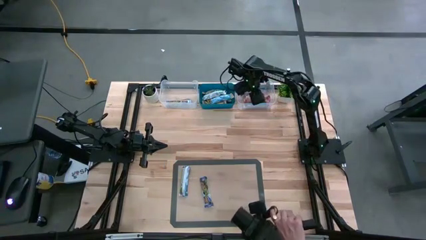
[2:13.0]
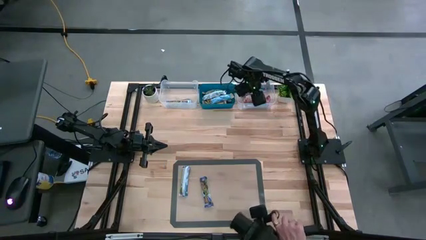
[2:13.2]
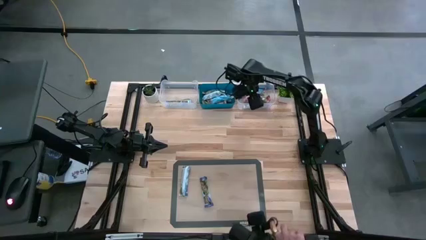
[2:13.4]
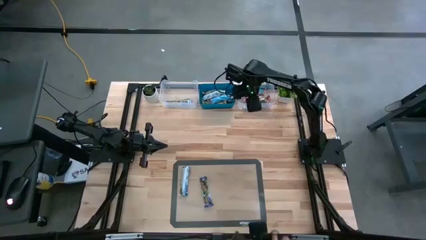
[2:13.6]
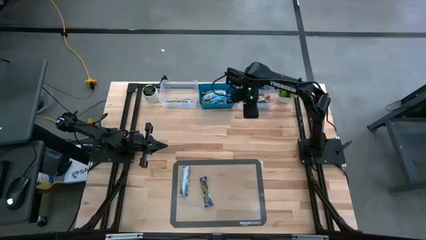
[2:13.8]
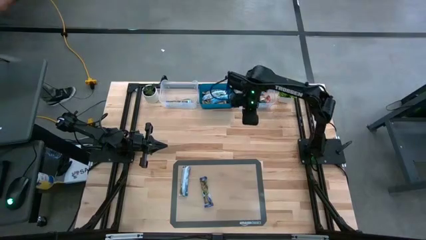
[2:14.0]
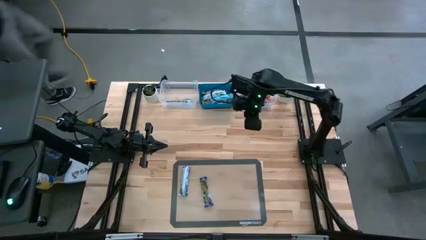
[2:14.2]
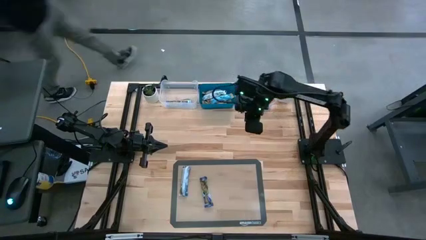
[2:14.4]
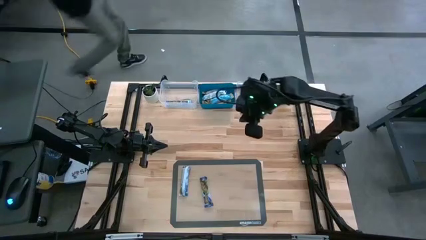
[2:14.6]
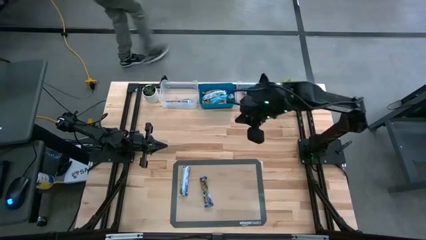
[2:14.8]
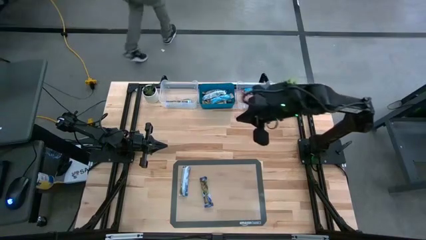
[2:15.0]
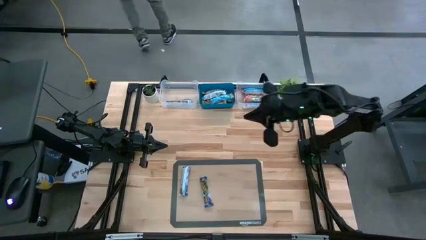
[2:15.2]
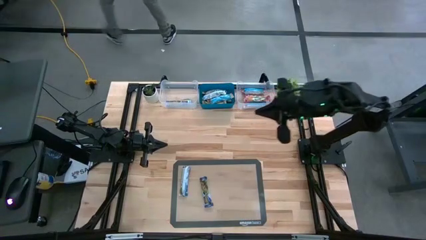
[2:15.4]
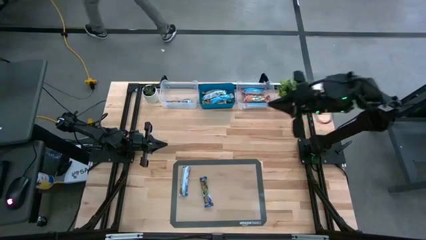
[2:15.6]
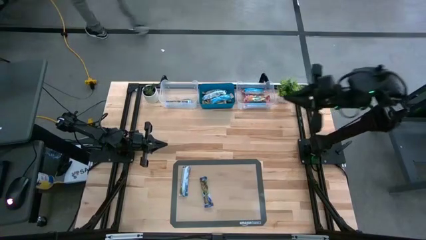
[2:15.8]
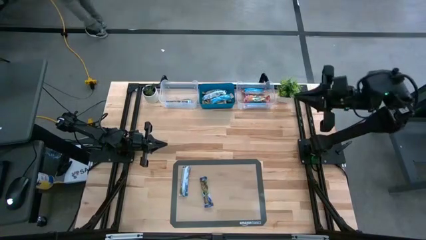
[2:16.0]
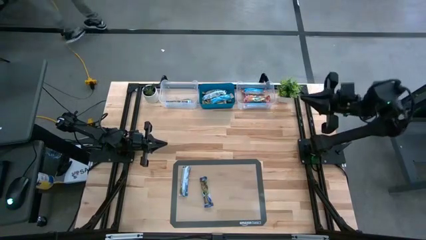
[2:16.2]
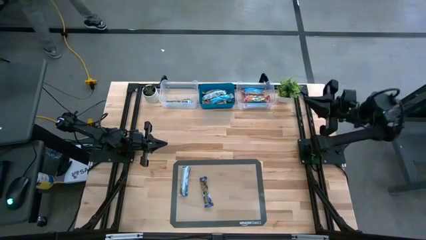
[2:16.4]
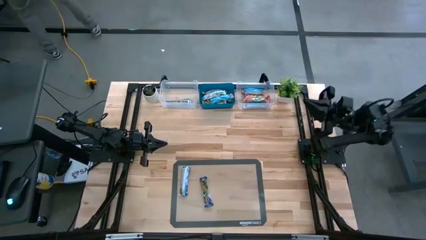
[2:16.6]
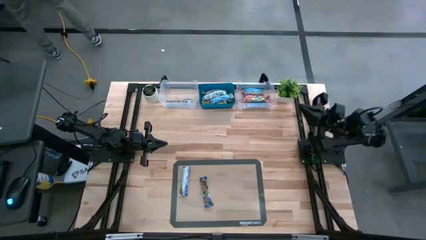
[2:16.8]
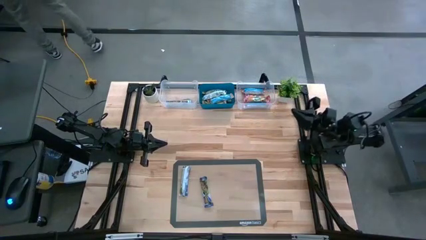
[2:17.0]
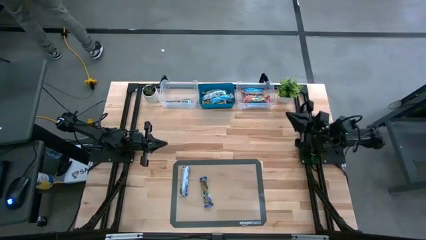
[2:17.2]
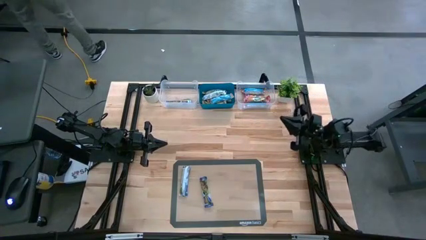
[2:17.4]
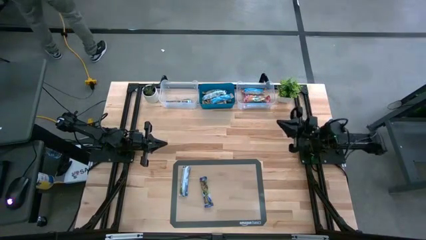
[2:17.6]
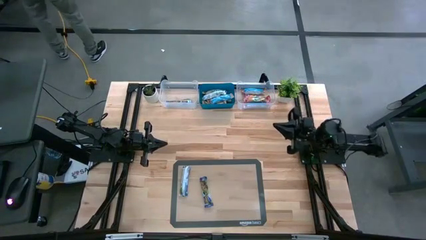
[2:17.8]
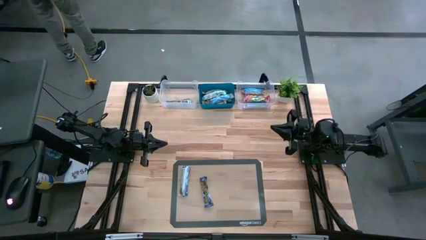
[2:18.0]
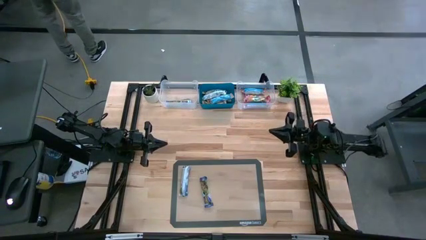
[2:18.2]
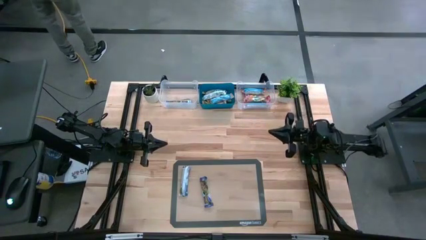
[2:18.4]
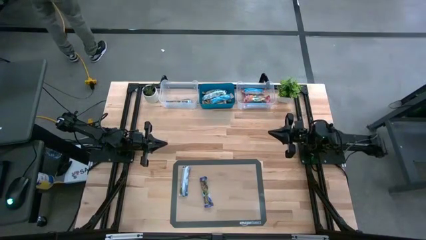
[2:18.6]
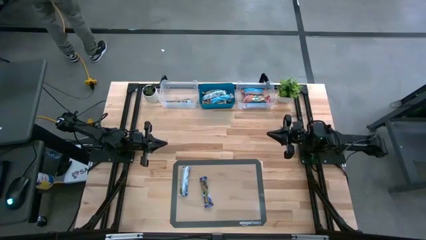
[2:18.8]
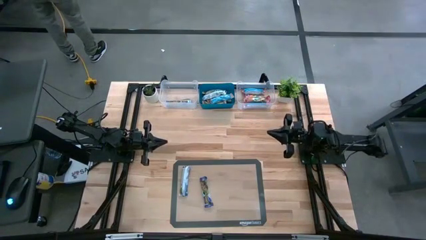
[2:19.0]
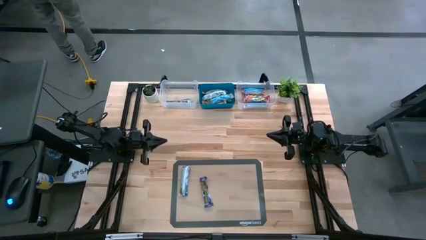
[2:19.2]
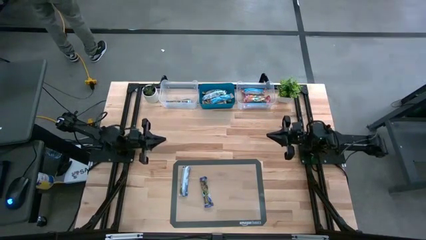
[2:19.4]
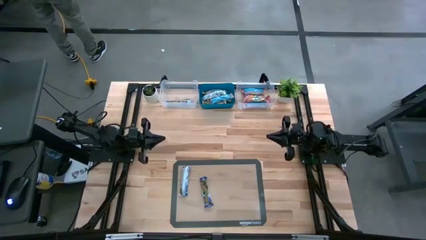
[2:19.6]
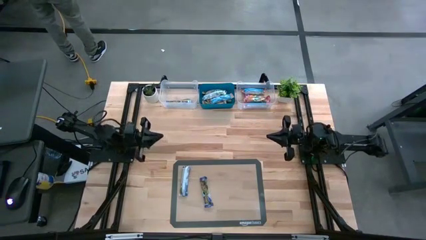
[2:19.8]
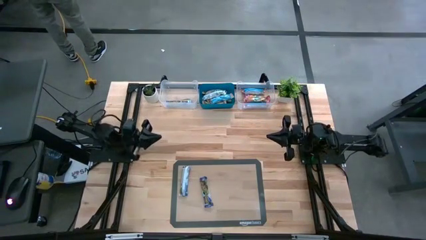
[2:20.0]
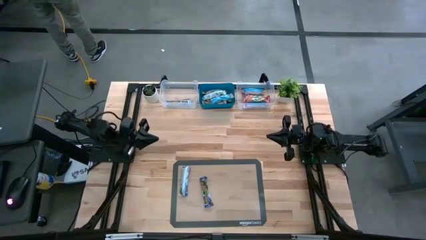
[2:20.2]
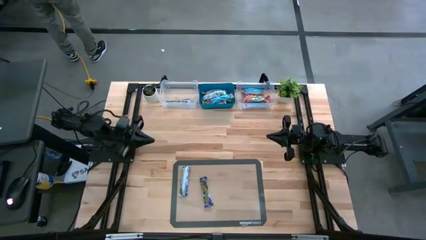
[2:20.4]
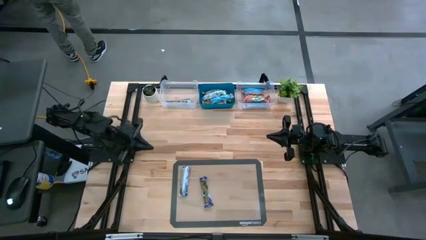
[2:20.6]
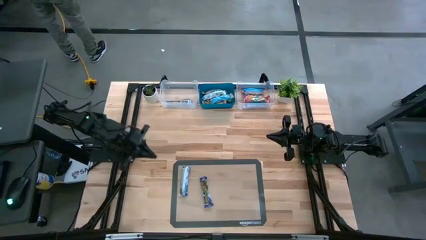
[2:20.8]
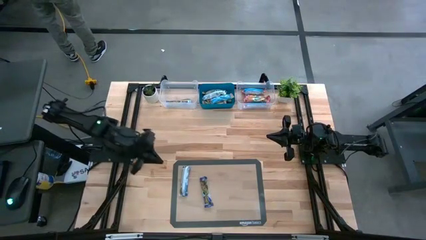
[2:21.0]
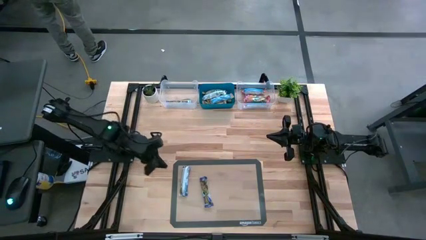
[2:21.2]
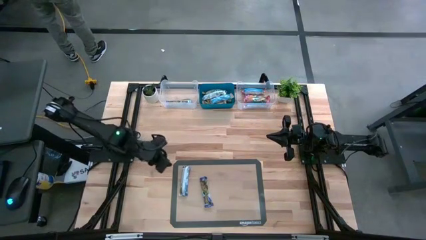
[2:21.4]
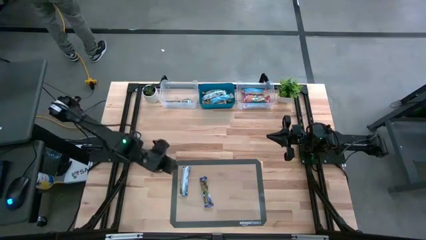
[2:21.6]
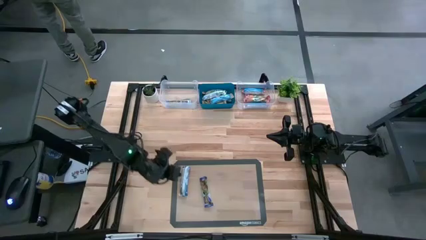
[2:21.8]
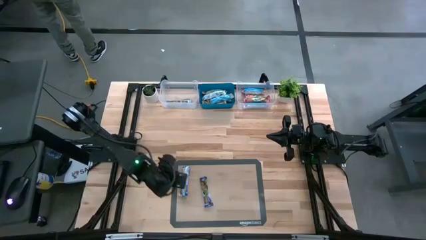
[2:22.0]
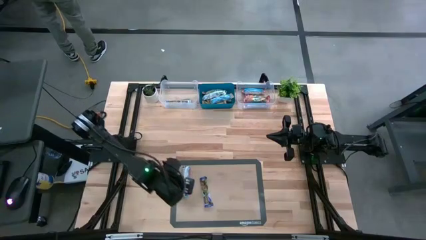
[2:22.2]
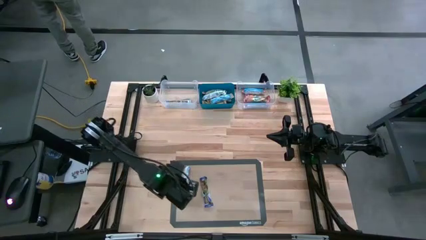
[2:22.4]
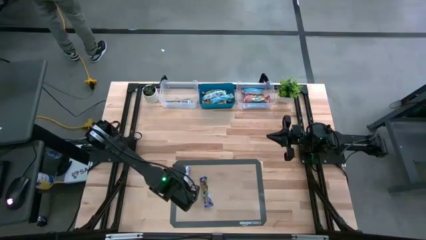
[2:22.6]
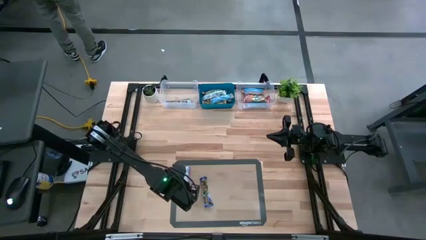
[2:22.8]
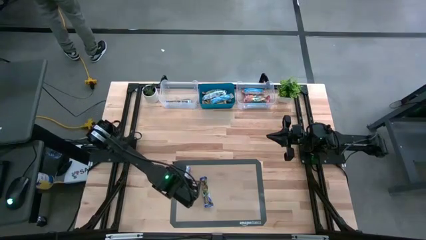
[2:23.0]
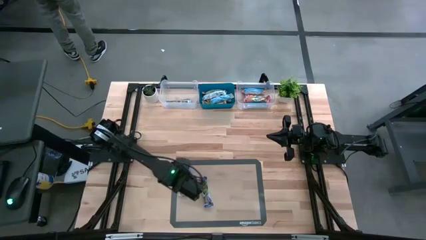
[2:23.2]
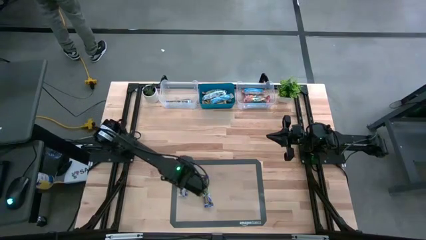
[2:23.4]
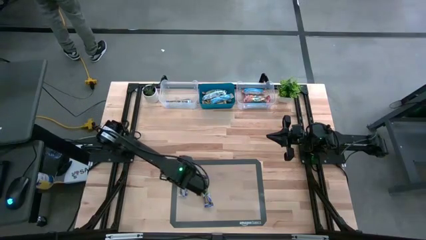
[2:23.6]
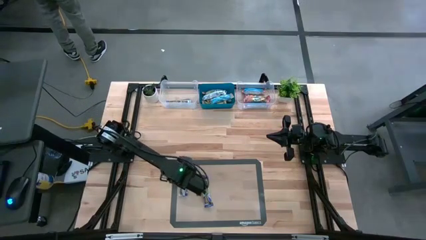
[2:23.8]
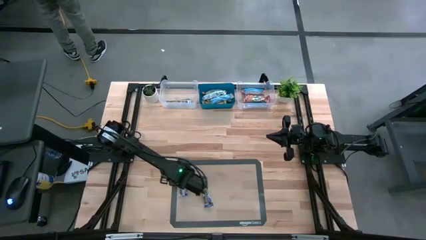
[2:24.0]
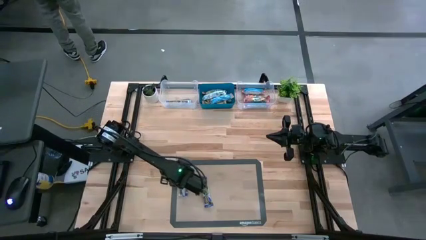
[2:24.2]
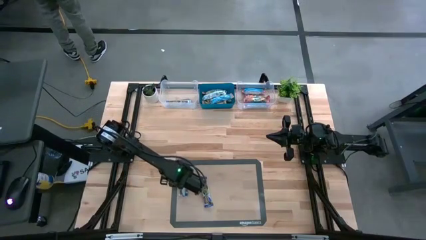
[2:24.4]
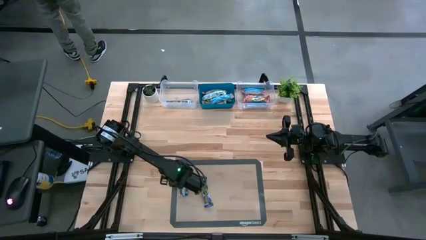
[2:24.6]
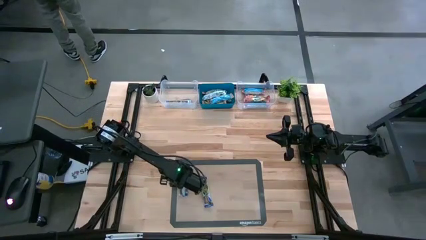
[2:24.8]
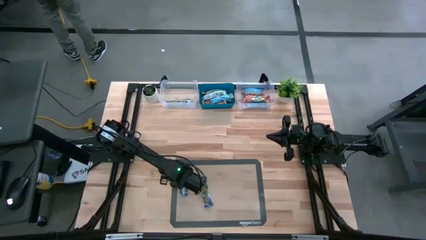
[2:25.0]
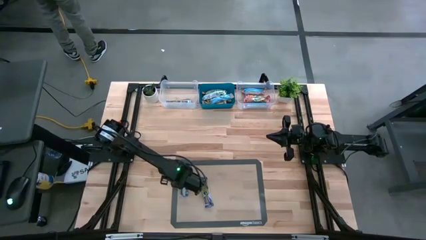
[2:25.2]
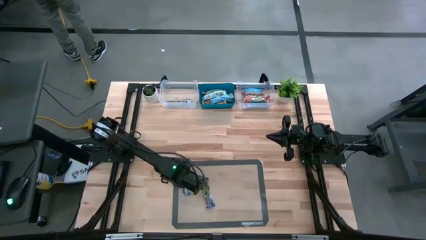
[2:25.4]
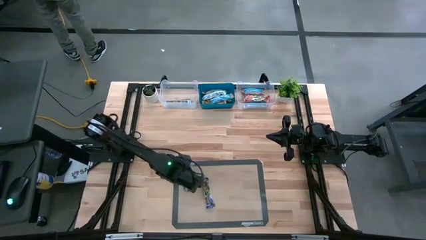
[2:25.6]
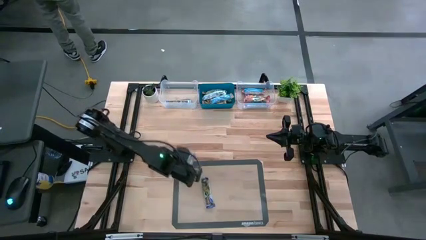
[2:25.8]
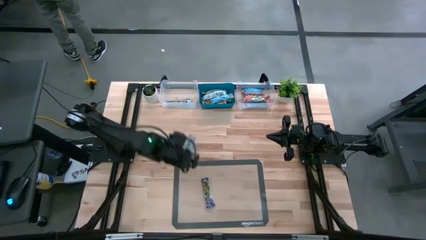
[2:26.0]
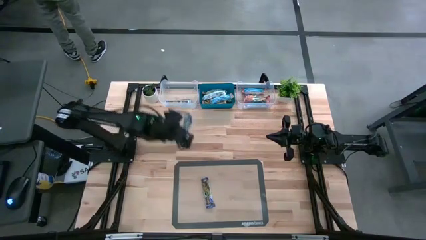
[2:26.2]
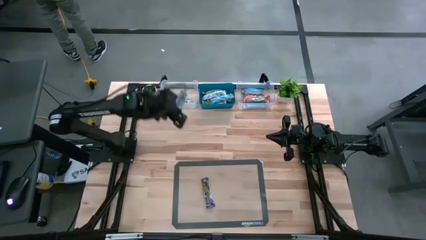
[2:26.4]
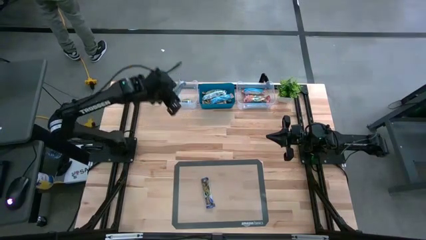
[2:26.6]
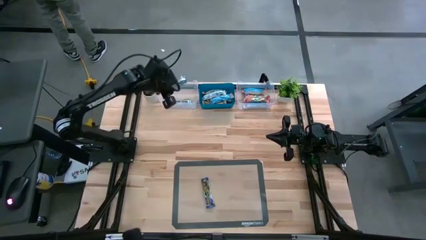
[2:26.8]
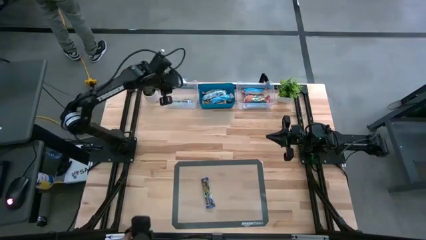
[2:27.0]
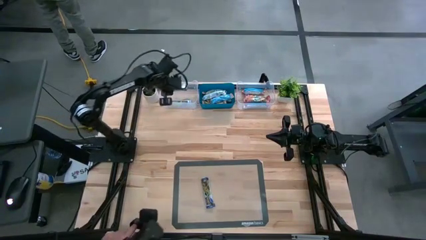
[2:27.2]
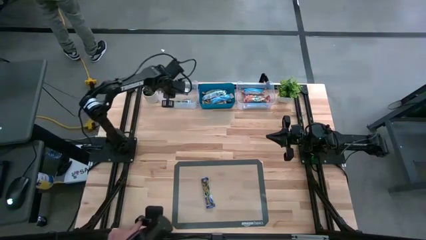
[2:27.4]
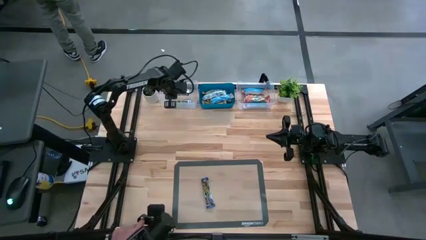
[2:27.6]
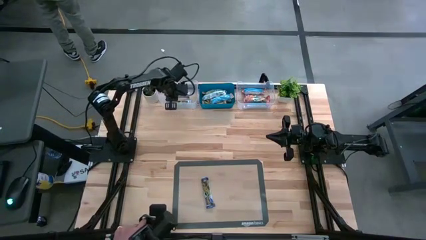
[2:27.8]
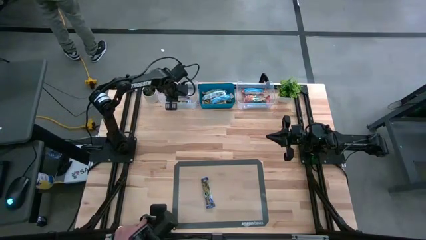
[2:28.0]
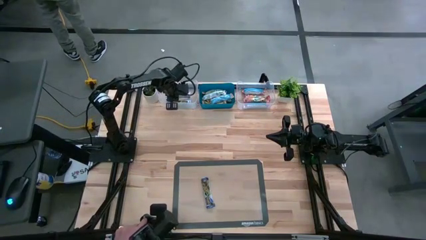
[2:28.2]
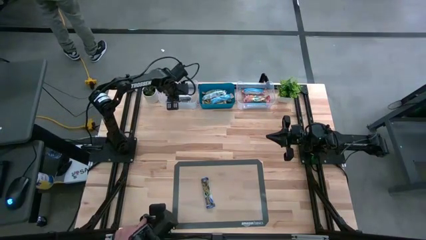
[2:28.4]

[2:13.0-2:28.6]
Task: Pick and place Granola Bars by type
Put the blue granola bar into the left transparent bin

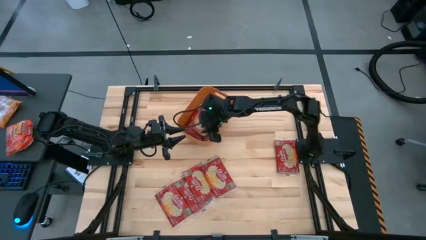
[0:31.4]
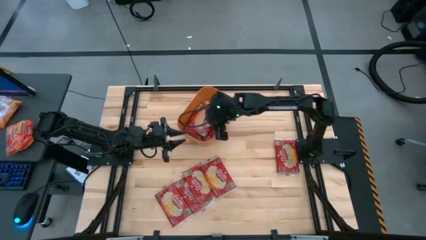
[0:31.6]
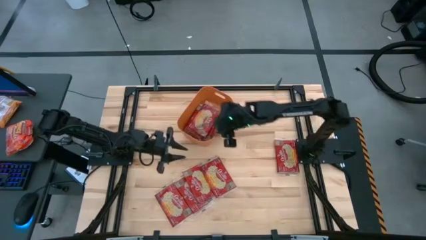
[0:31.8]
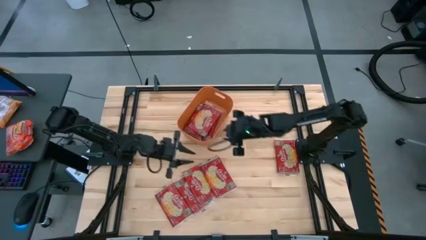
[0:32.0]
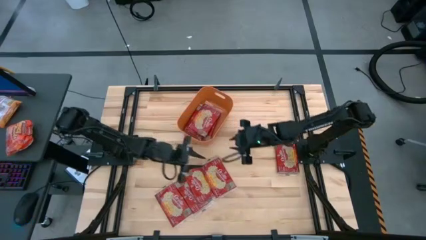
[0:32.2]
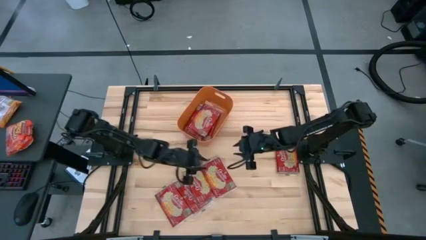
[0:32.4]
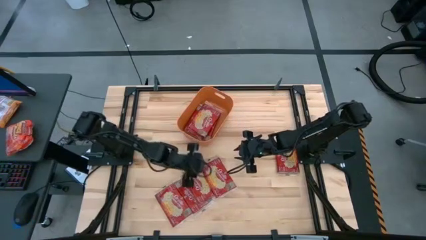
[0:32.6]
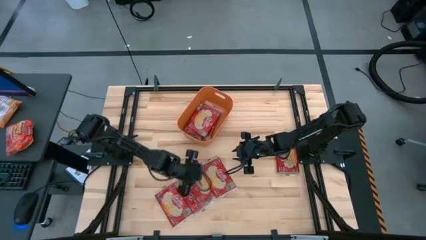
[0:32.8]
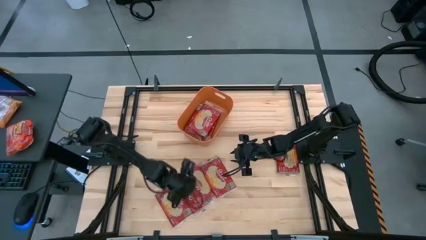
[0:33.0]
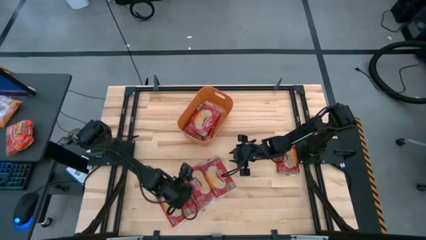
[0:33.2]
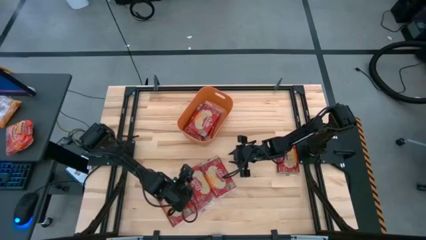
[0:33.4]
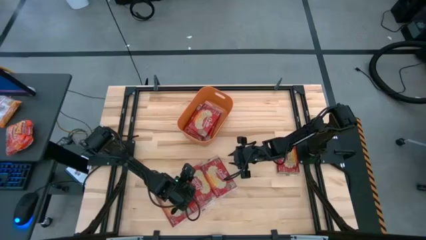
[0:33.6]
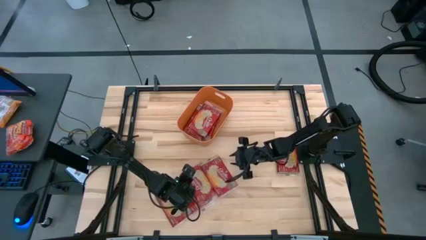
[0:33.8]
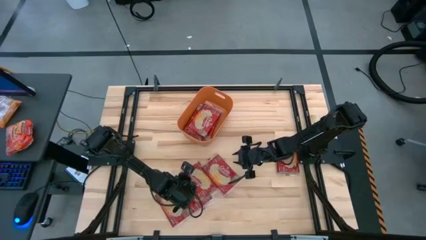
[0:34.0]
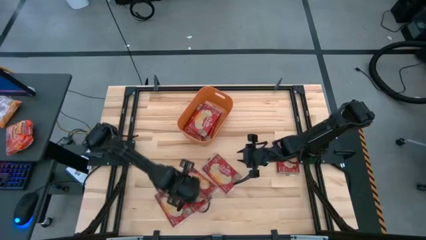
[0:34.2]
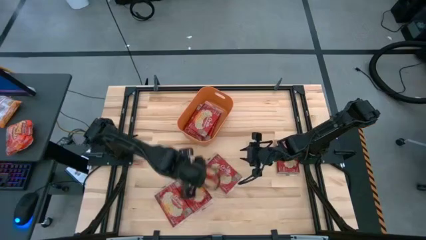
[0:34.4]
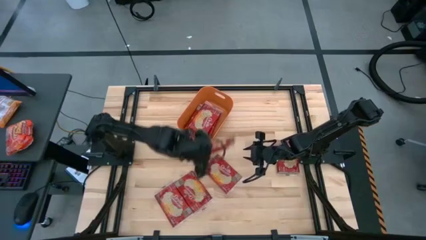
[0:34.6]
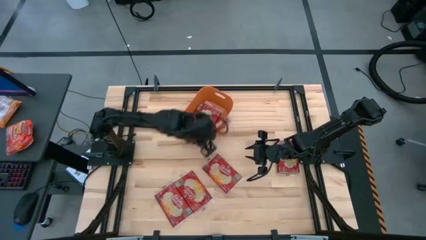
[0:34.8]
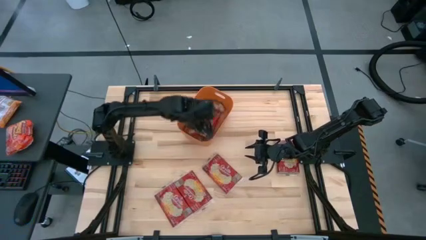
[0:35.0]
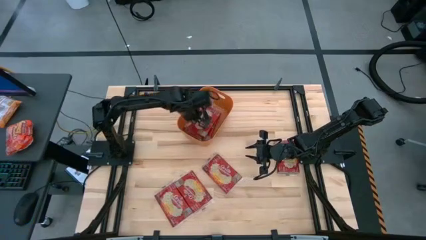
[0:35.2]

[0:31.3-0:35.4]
Task: Sort popcorn bags into baskets
Put the red popcorn bag into the orange bin
